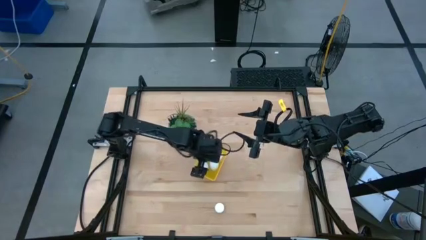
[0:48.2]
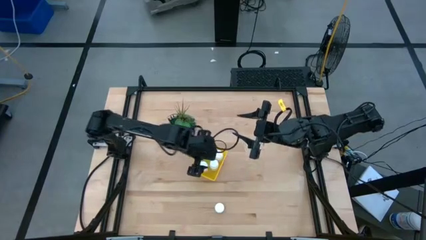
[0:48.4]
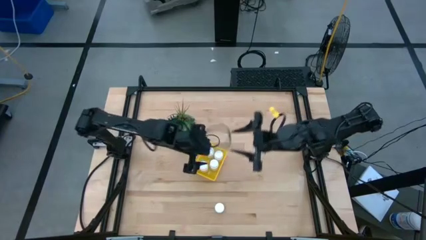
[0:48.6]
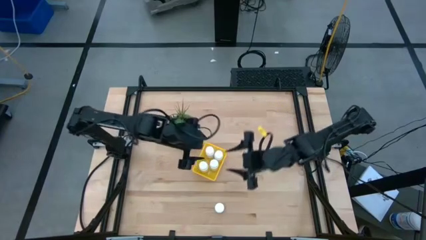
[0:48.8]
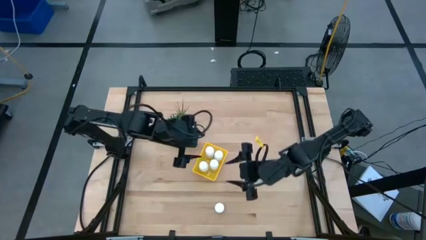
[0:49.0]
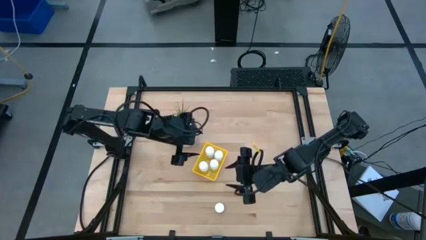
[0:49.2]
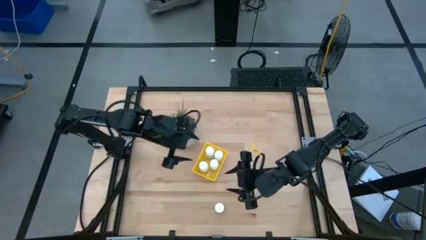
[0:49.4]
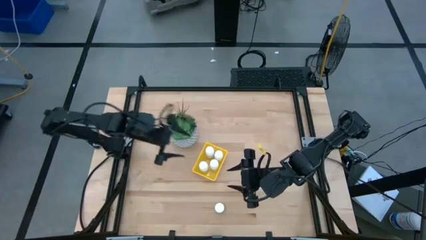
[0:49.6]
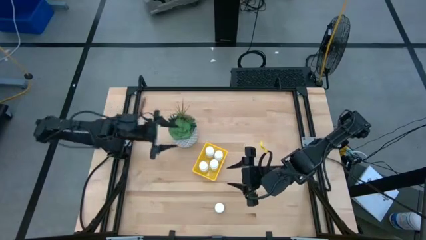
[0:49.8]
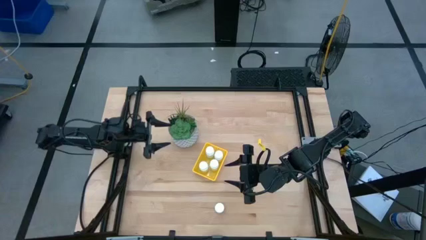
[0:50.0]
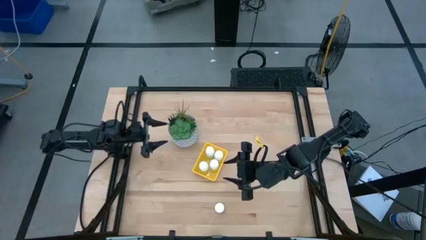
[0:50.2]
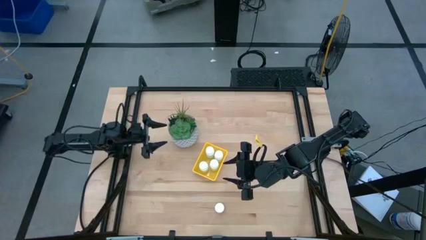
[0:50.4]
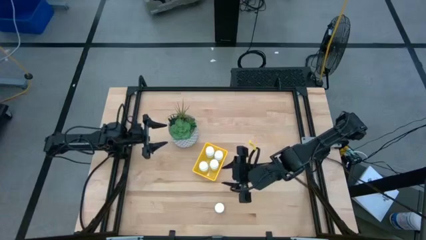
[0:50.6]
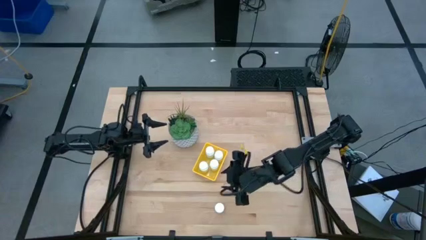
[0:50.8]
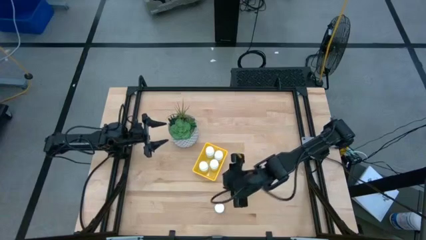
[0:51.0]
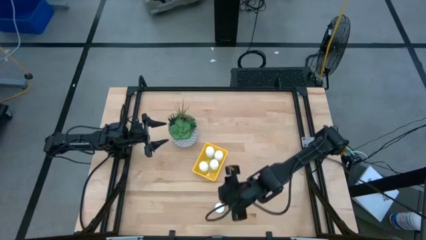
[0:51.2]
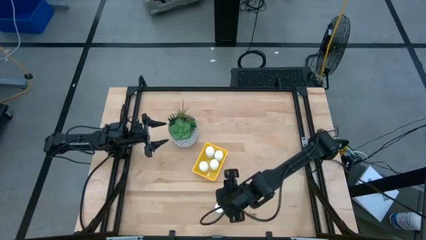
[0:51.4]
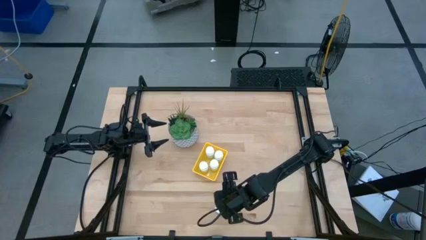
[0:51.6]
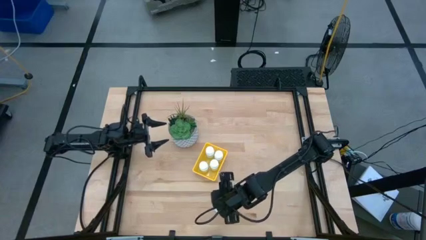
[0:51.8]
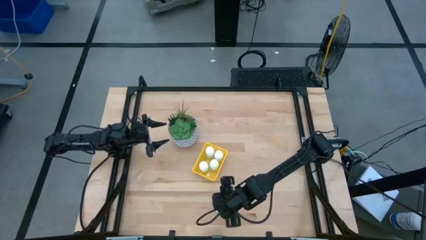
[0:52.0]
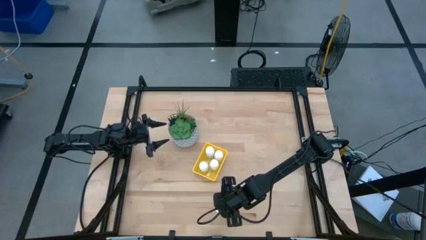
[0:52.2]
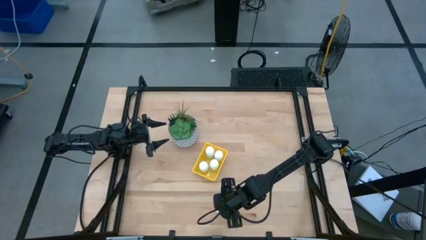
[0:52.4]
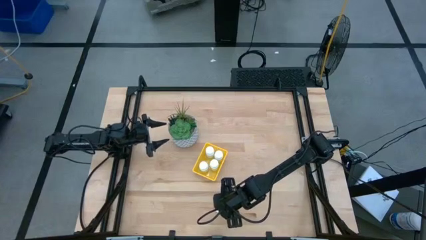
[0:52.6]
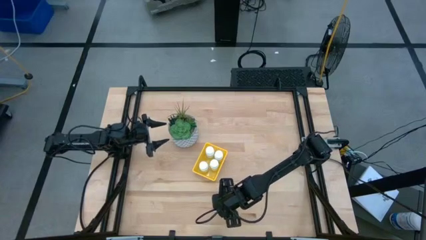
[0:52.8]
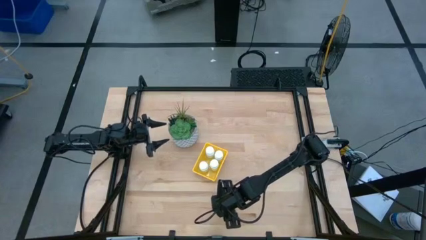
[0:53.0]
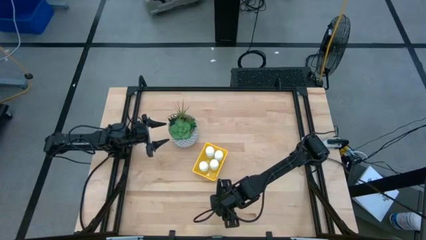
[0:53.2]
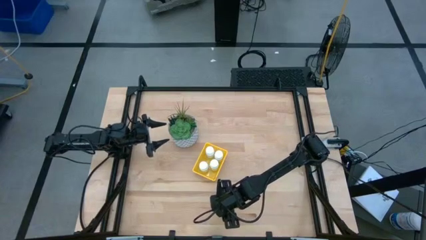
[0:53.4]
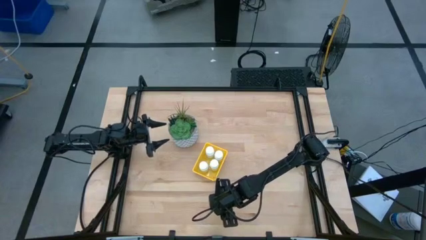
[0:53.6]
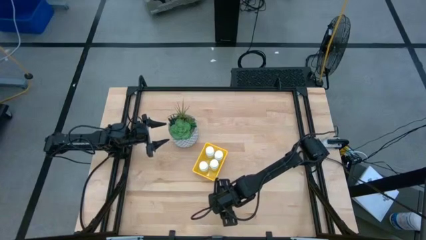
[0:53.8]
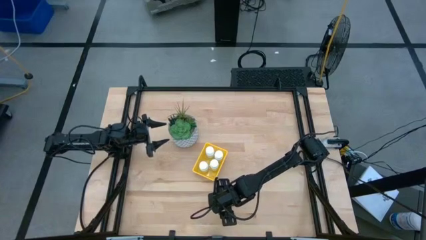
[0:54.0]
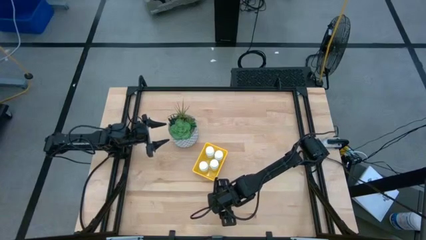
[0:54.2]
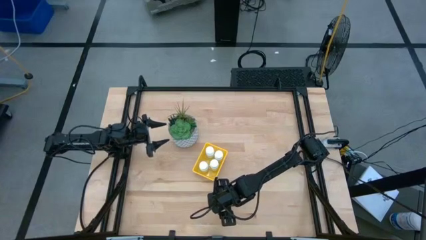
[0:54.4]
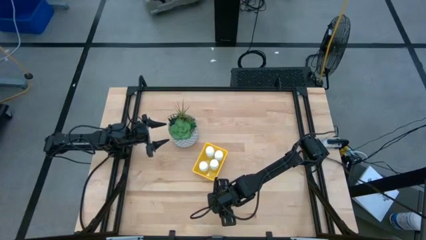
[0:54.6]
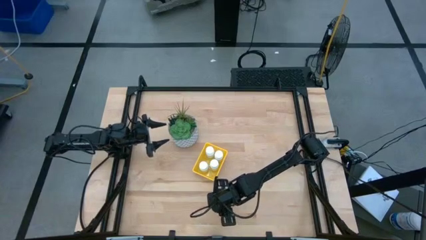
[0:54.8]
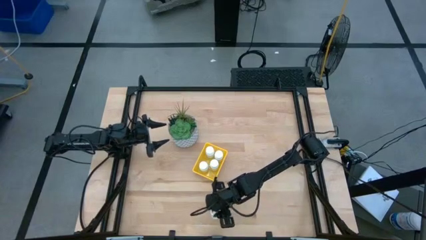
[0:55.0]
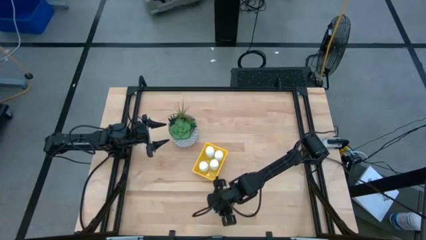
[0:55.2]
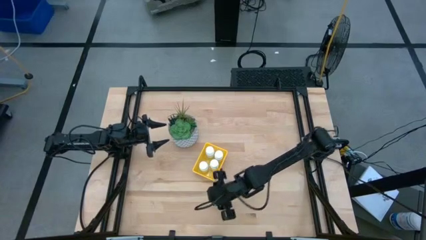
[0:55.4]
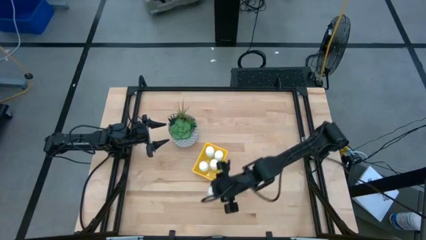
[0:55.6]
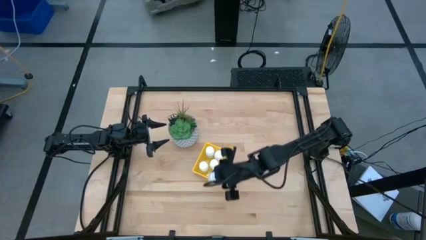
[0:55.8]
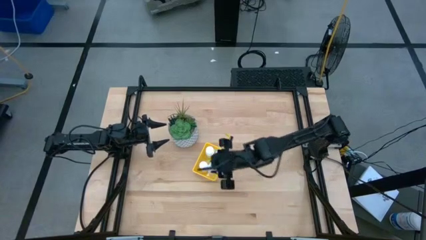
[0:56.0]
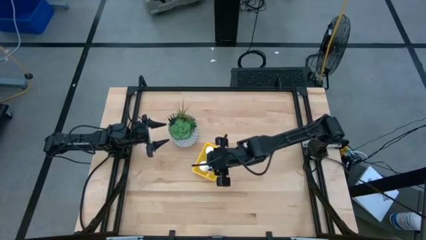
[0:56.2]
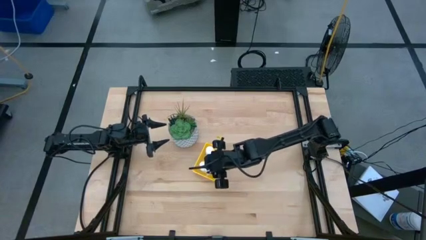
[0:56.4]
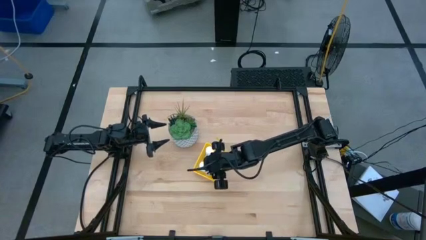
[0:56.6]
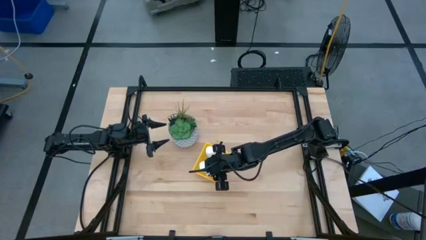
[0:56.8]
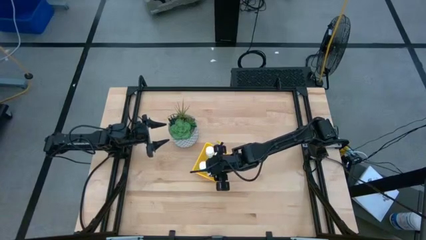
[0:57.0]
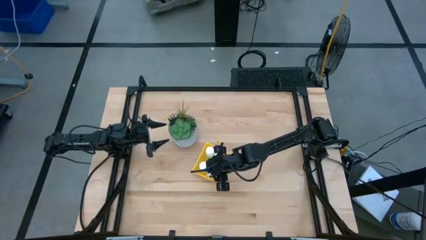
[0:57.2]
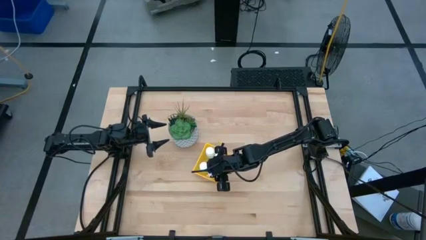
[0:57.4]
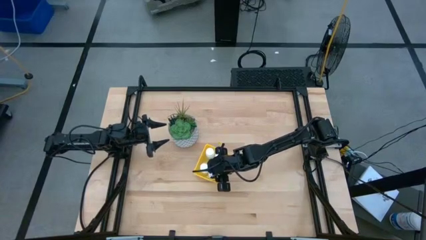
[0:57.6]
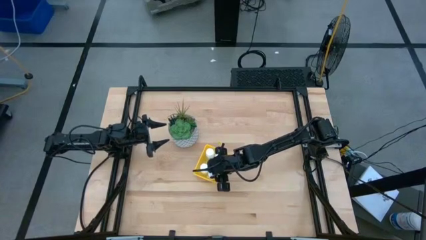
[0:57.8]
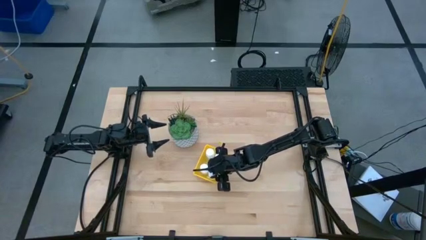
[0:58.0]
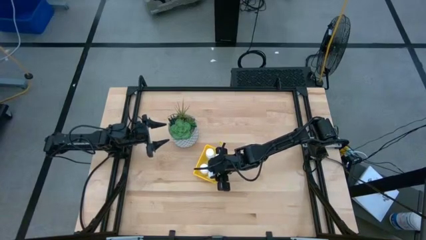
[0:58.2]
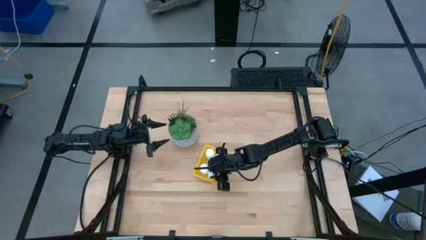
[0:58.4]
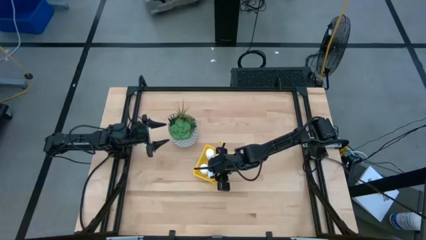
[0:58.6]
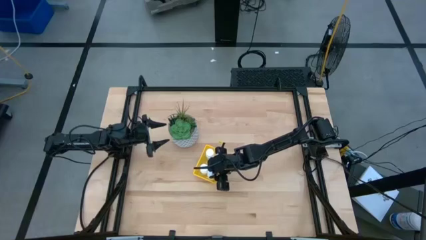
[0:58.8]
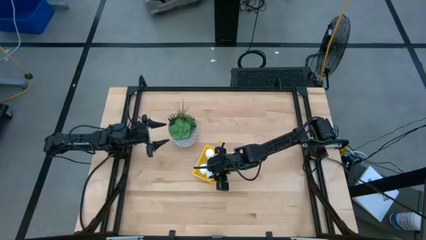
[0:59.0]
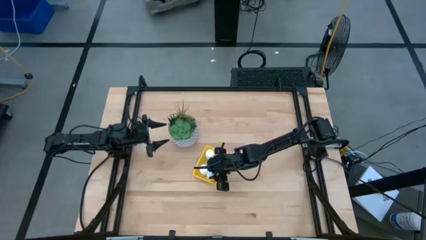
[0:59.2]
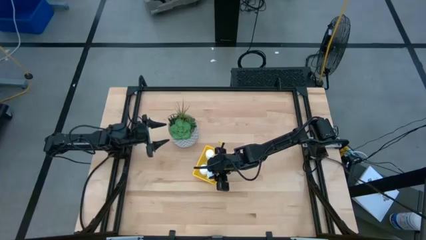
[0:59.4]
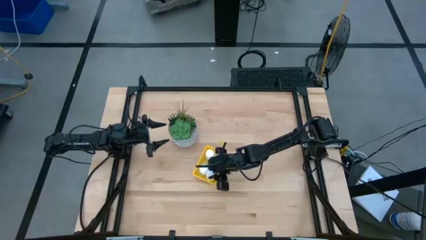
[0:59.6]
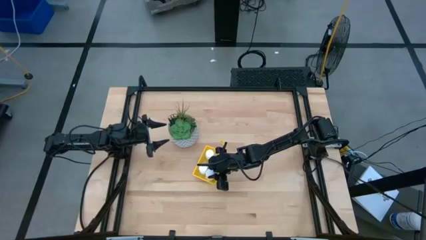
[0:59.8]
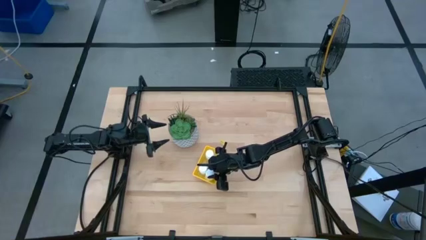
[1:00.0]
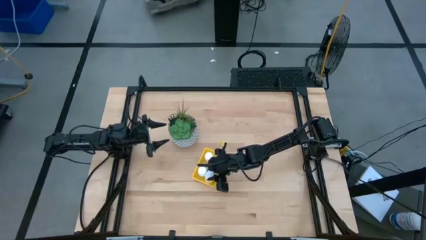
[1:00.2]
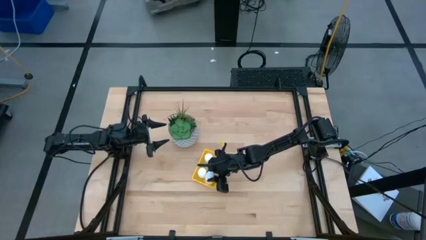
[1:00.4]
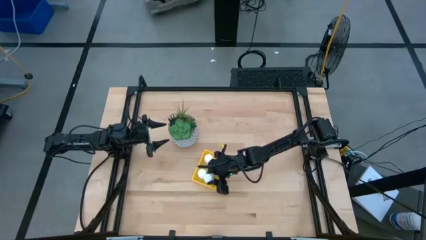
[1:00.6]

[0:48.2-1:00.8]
Task: Pick and place pill bottles into a basket
Put the white pill bottle into the yellow basket
